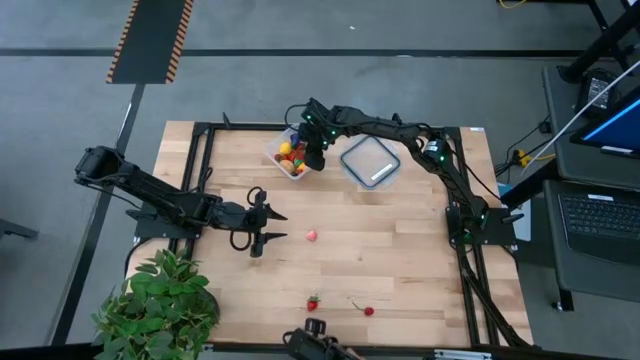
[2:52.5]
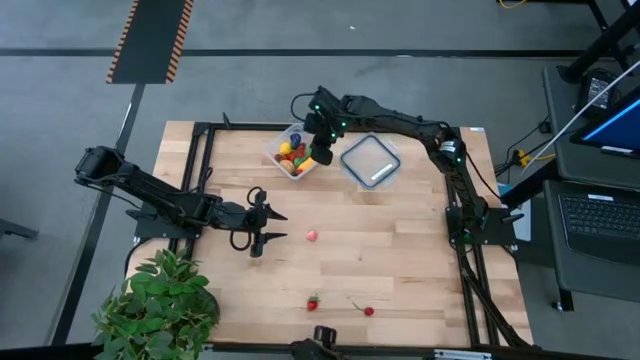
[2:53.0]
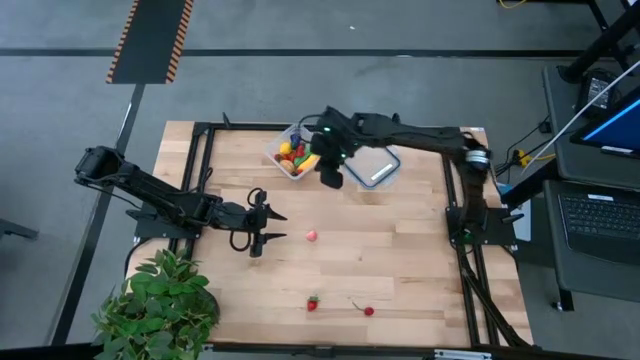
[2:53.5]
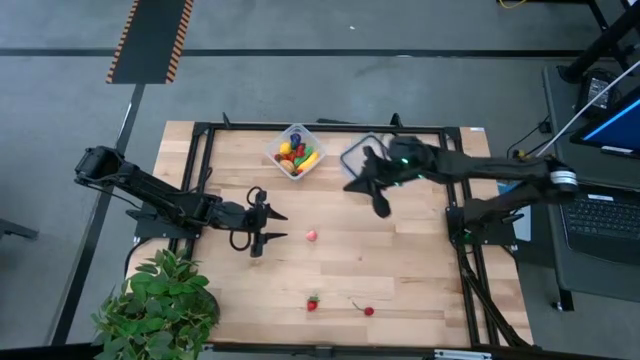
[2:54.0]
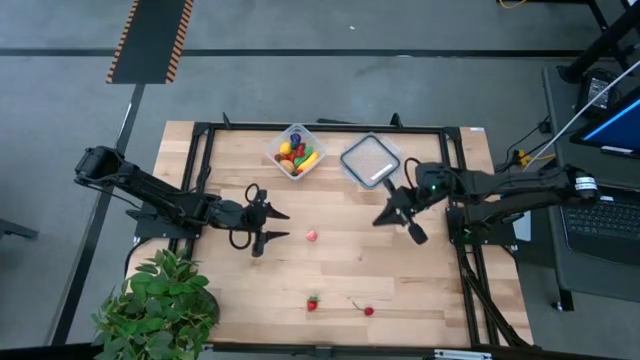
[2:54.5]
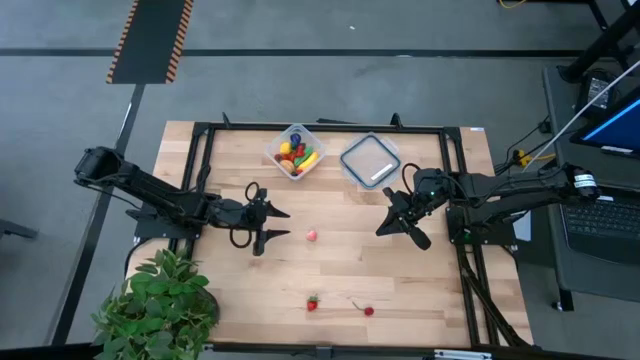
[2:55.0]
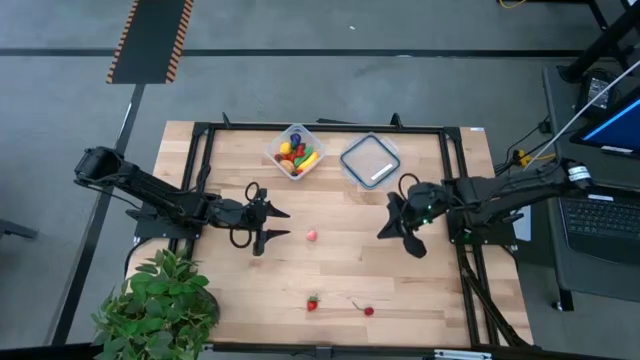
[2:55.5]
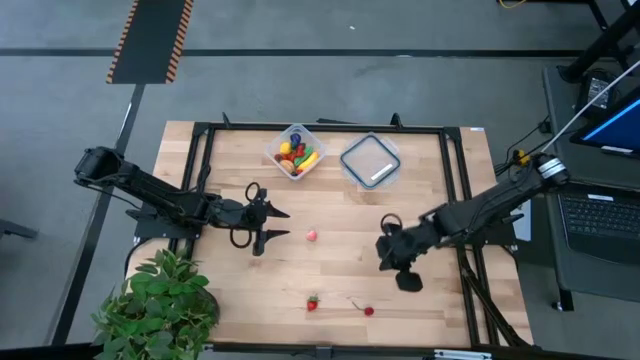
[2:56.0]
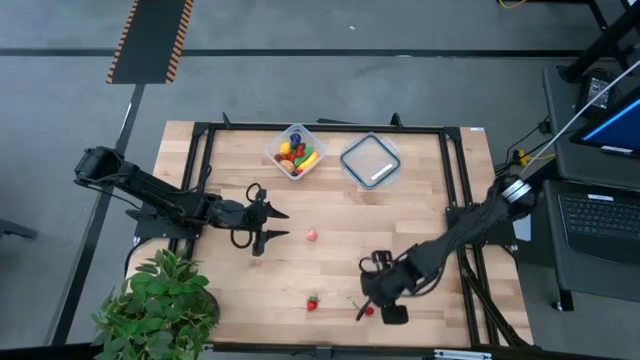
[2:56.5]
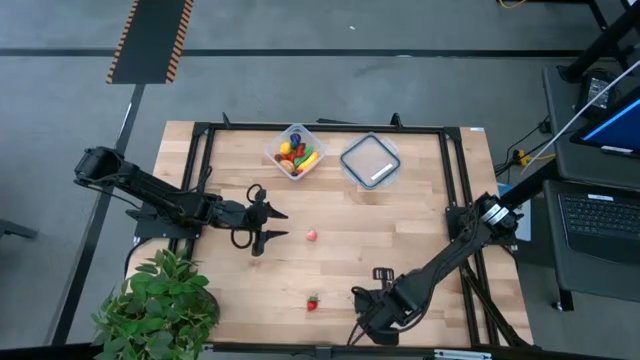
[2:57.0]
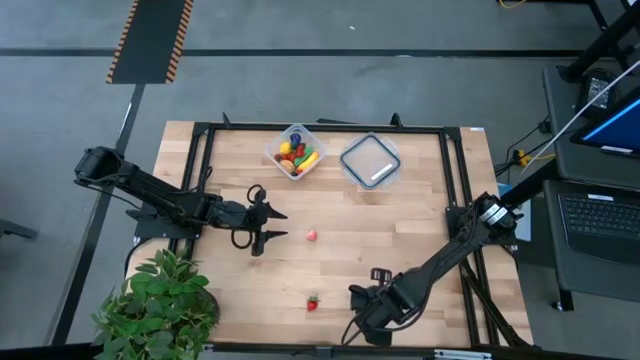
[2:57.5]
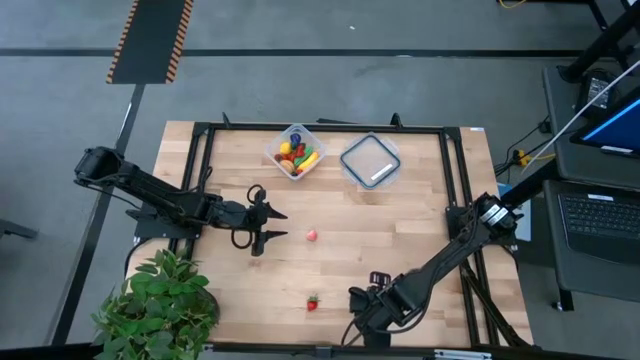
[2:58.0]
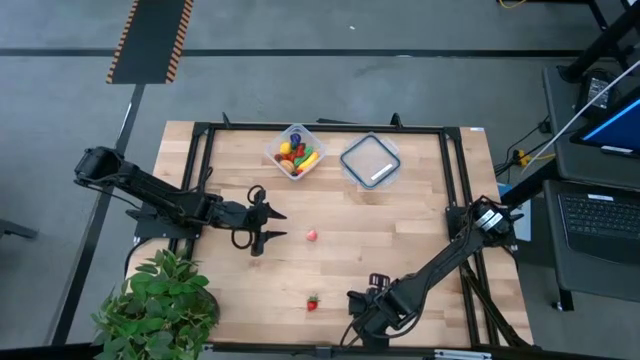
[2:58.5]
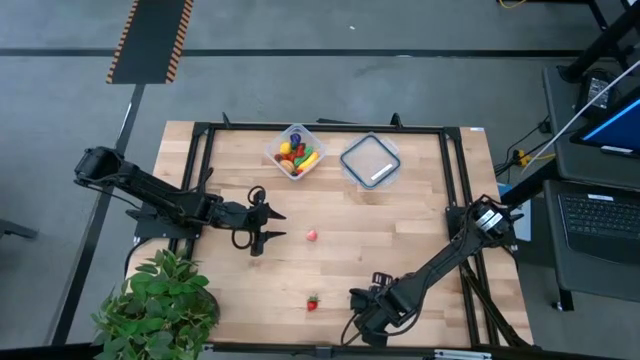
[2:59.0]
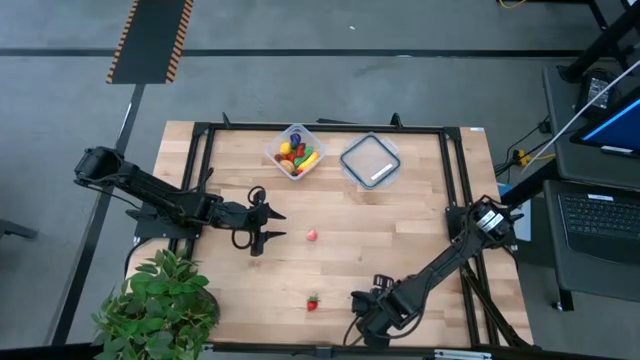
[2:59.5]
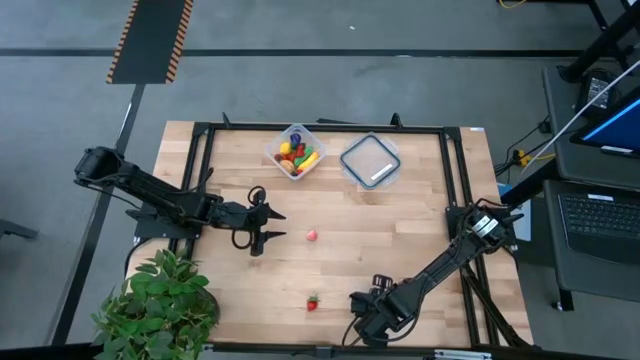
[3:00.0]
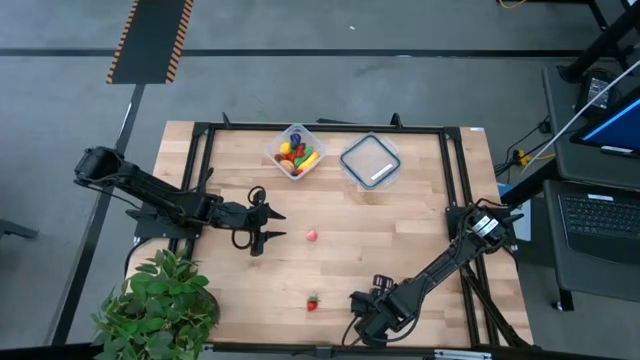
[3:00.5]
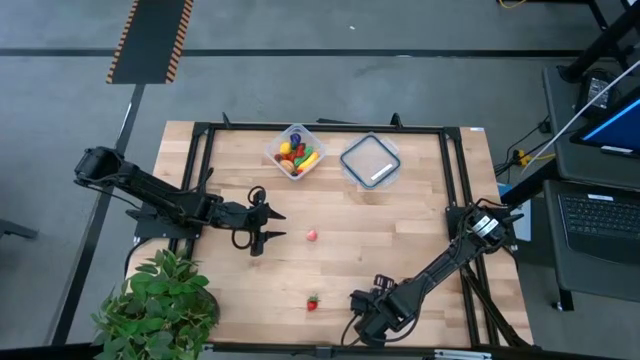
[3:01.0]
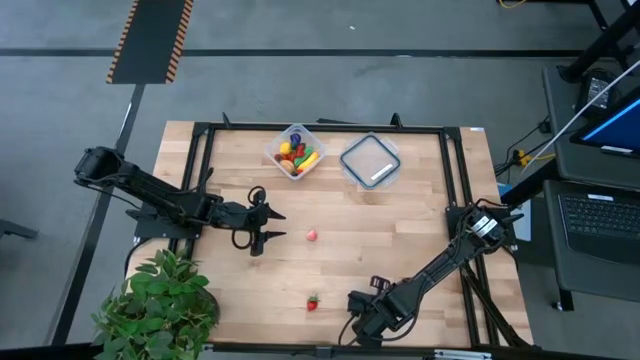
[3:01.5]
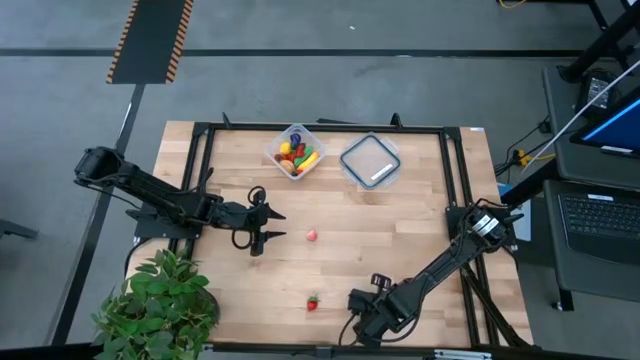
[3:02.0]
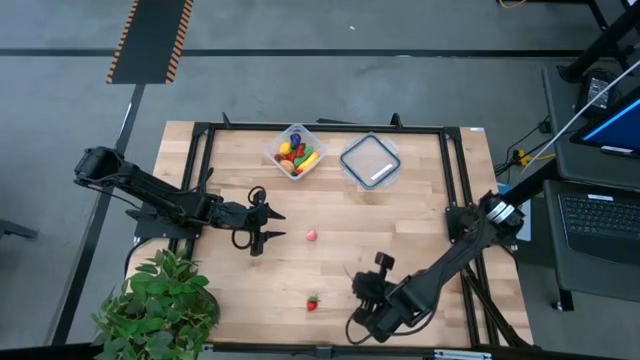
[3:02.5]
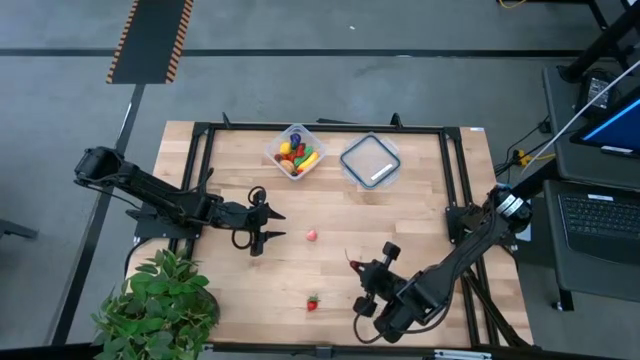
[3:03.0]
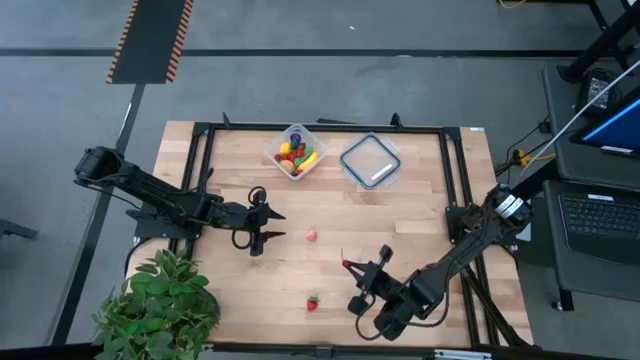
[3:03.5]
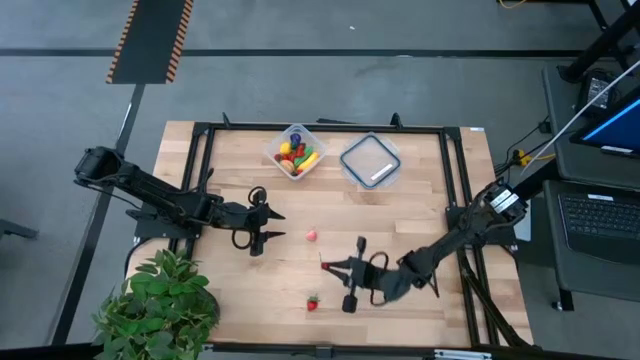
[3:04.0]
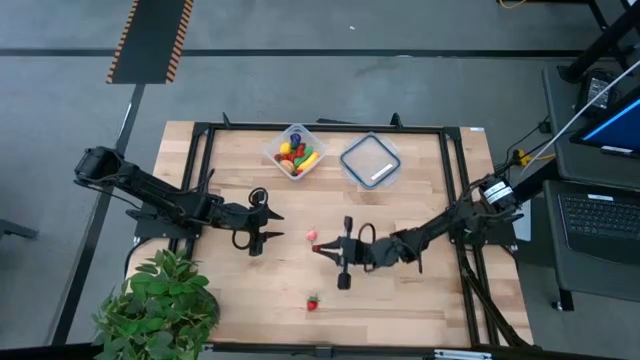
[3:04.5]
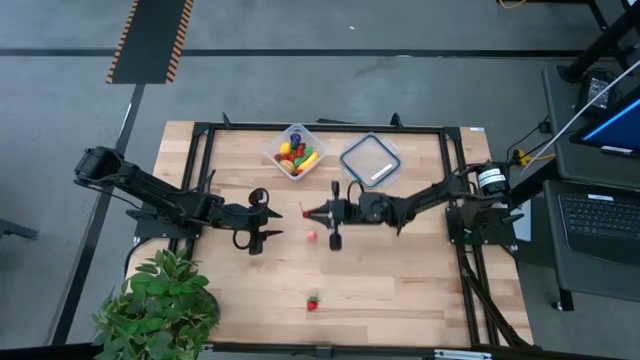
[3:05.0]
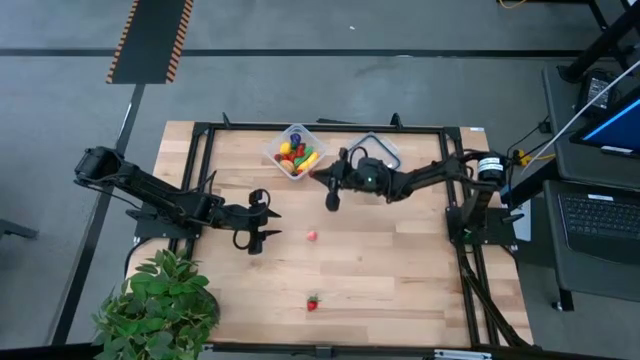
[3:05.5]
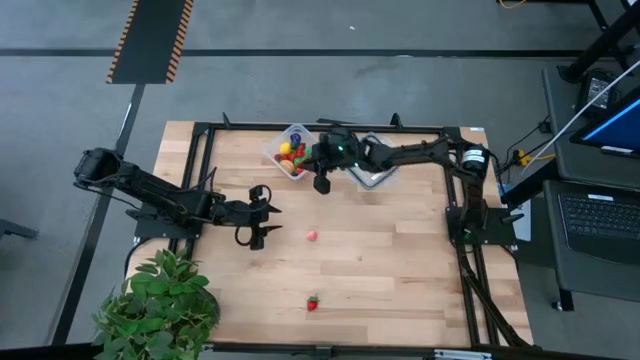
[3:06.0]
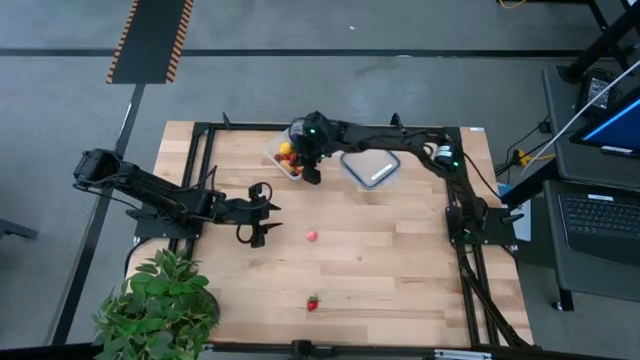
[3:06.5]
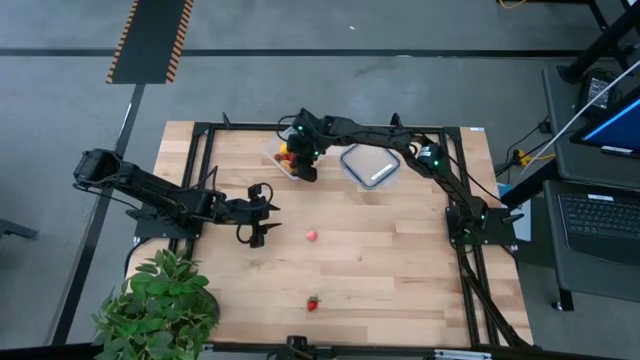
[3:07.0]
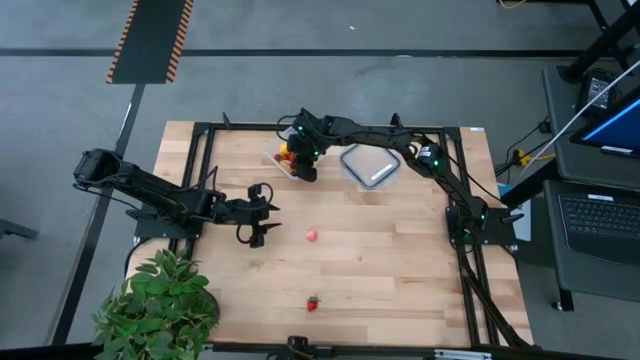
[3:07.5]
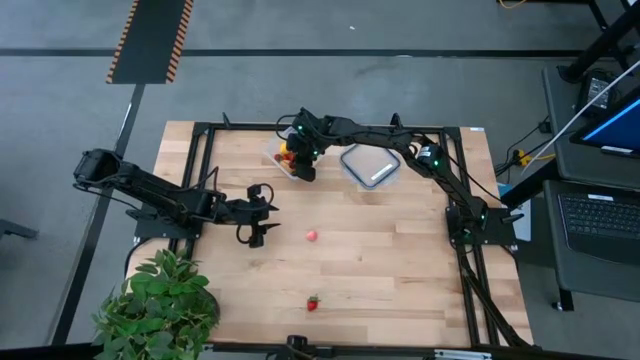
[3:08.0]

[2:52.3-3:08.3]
Task: Pick and placing Produce into tupperware
Put the cherry into the transparent container

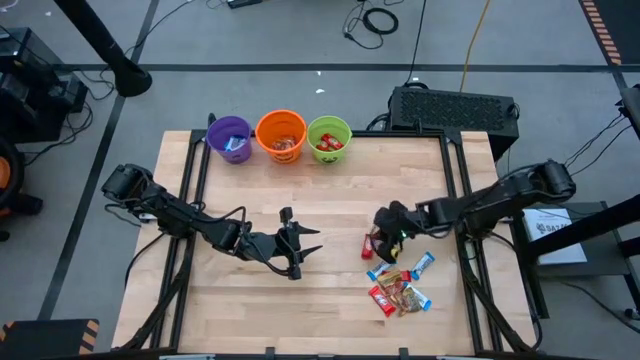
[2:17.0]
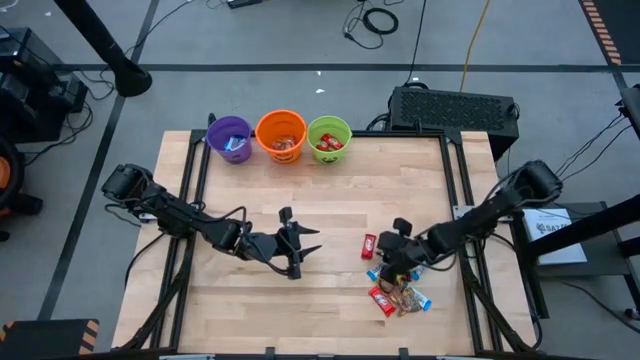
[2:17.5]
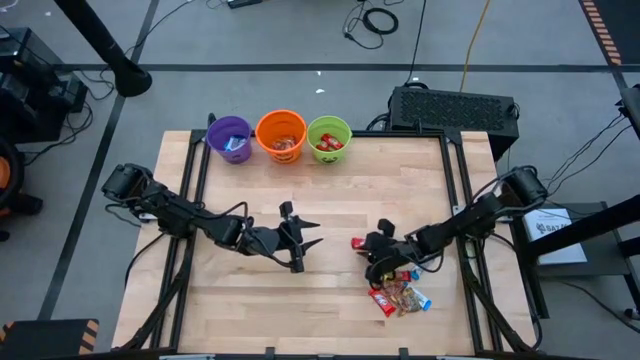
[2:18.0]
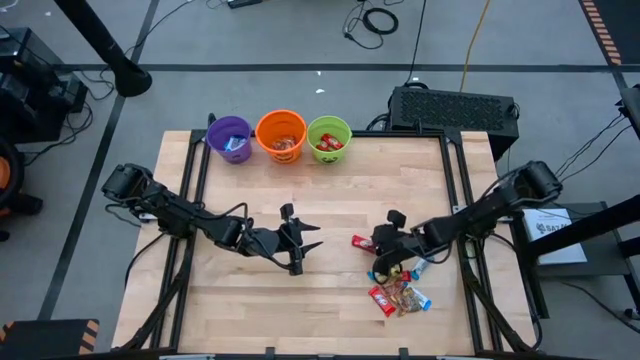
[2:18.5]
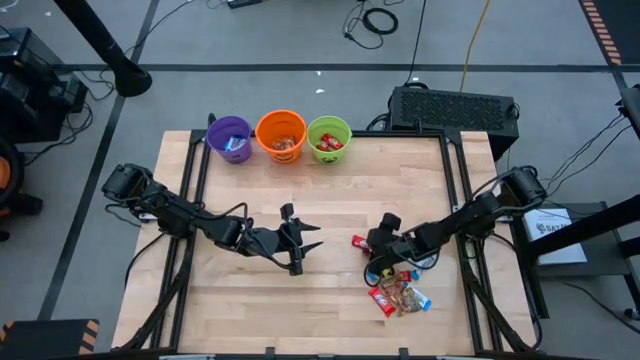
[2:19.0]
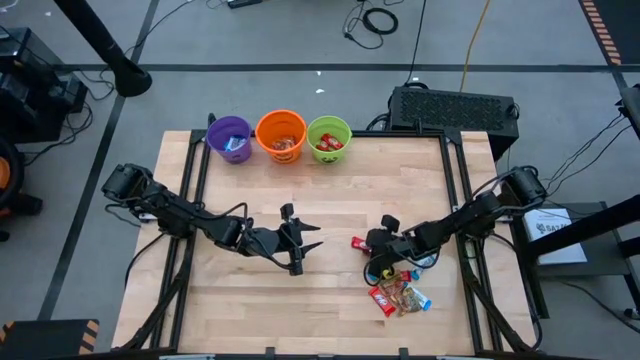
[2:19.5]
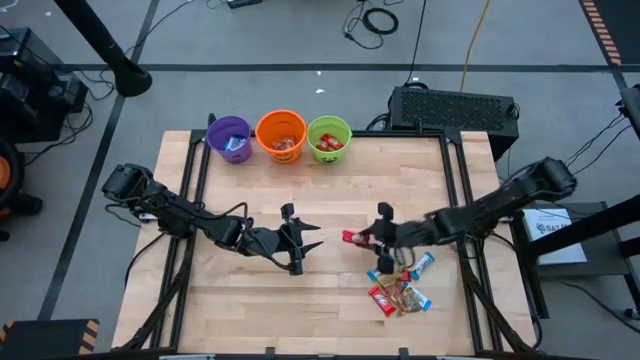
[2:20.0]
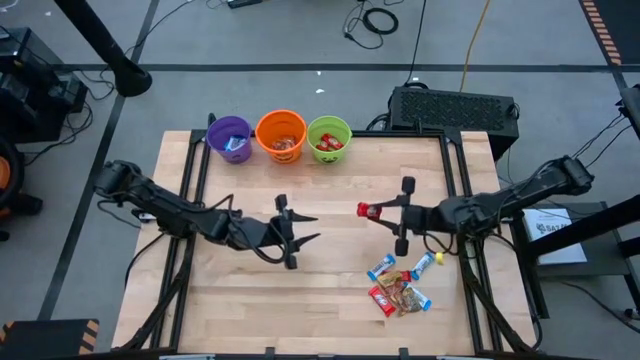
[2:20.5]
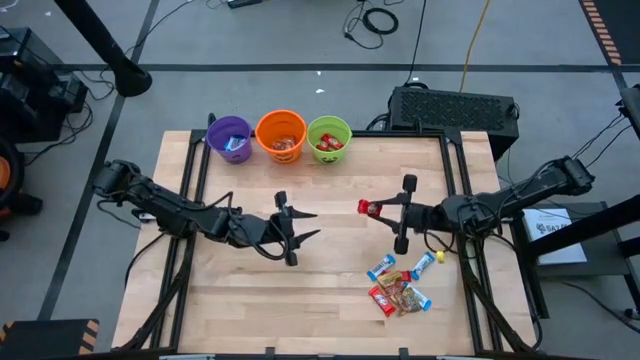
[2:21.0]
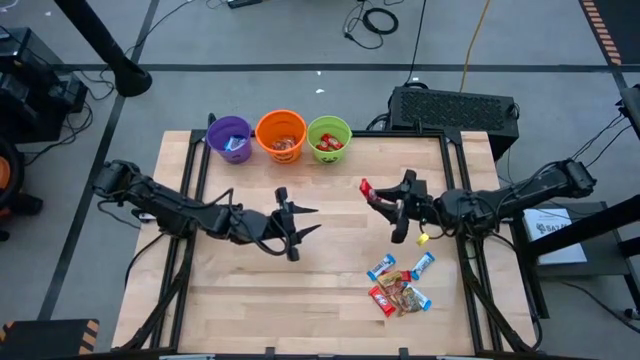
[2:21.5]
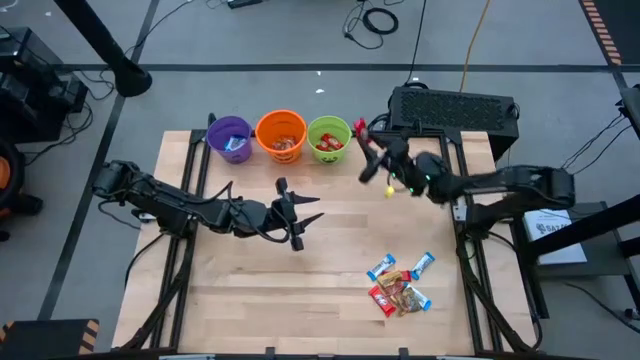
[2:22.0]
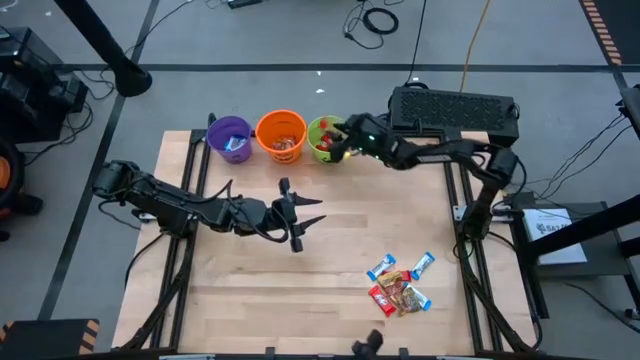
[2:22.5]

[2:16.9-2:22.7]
Task: Sort candy by brand, put in halloween buckets
Put the top red chocolate bar into the green bucket
